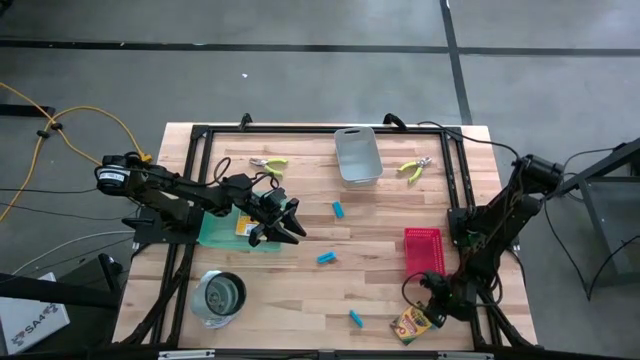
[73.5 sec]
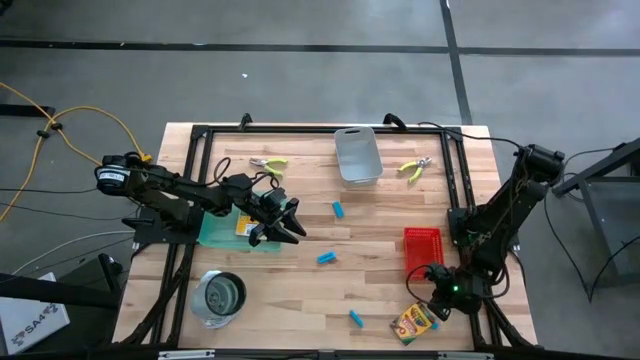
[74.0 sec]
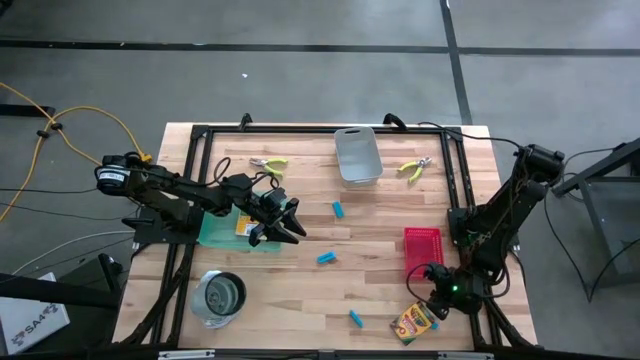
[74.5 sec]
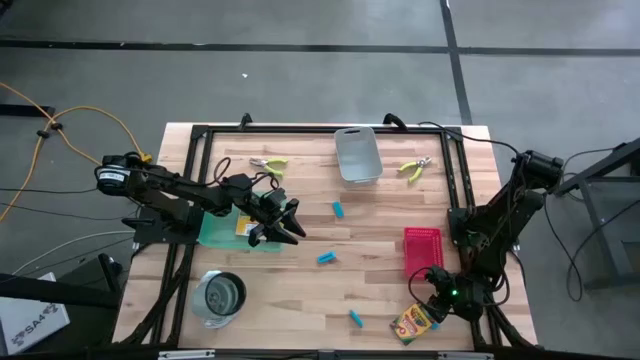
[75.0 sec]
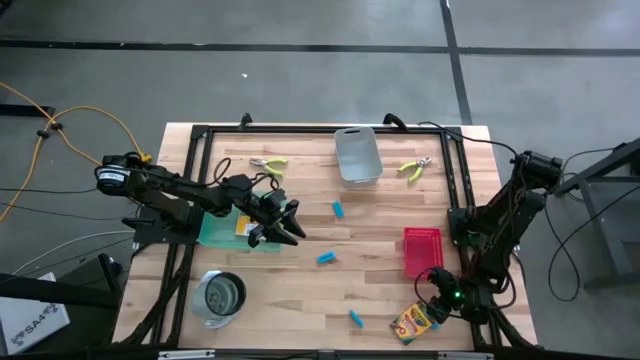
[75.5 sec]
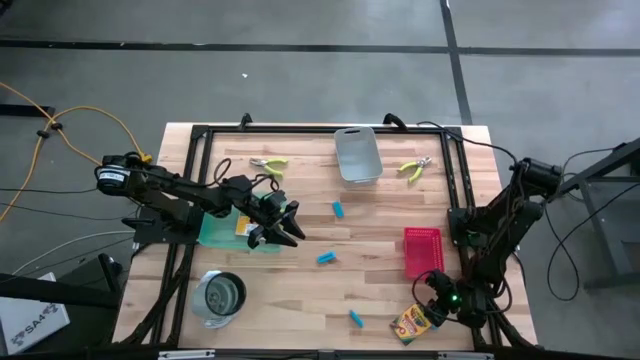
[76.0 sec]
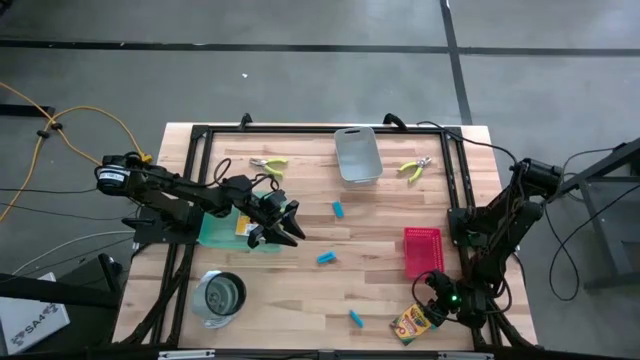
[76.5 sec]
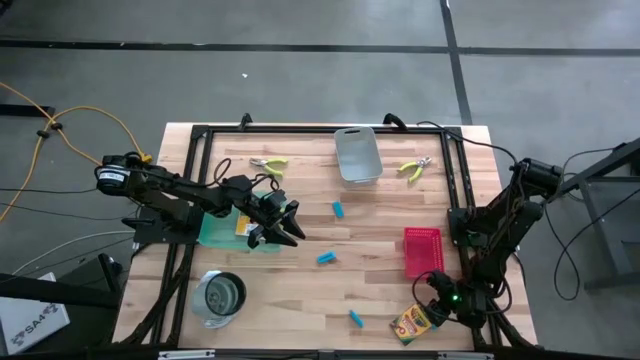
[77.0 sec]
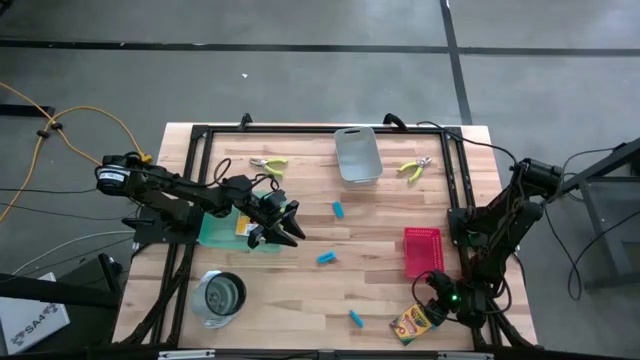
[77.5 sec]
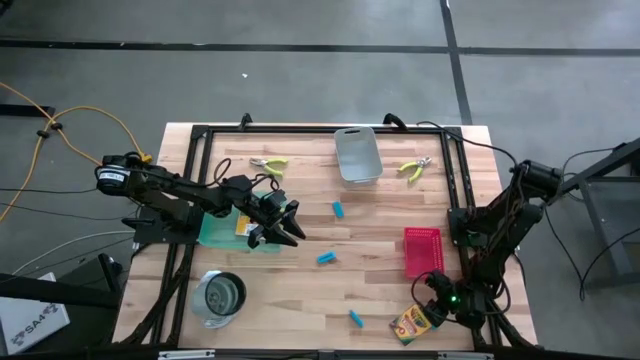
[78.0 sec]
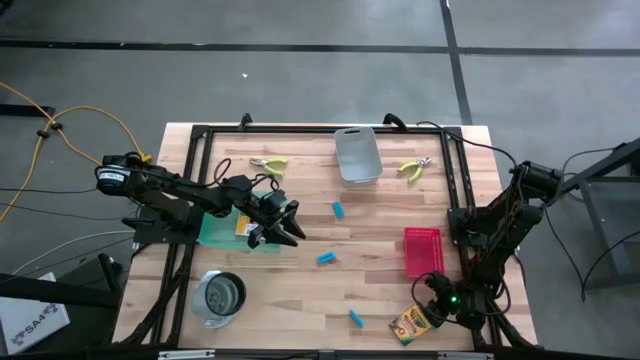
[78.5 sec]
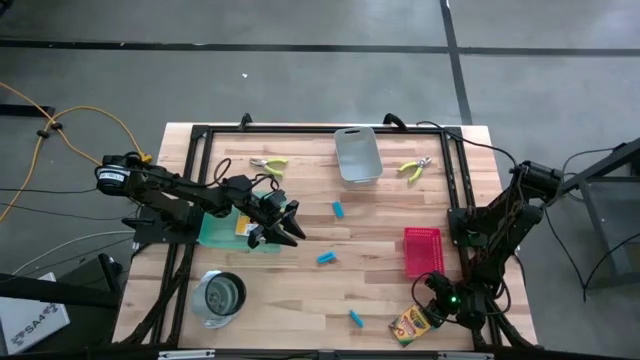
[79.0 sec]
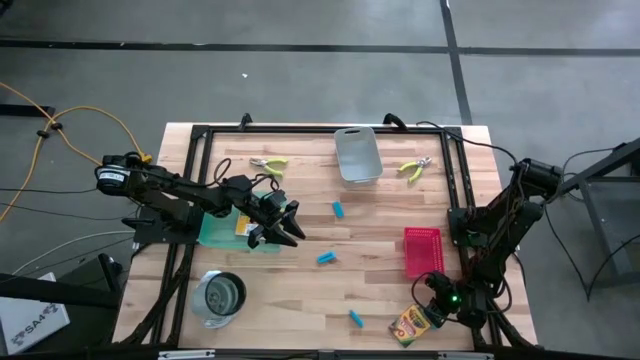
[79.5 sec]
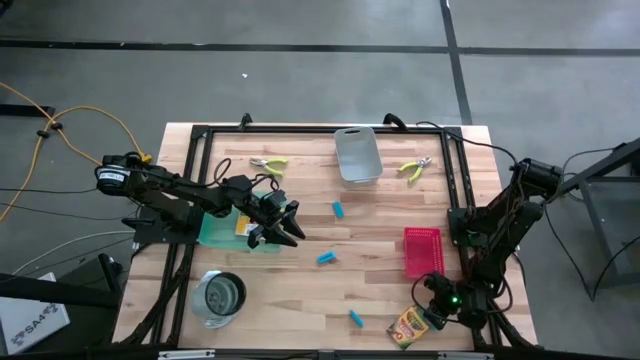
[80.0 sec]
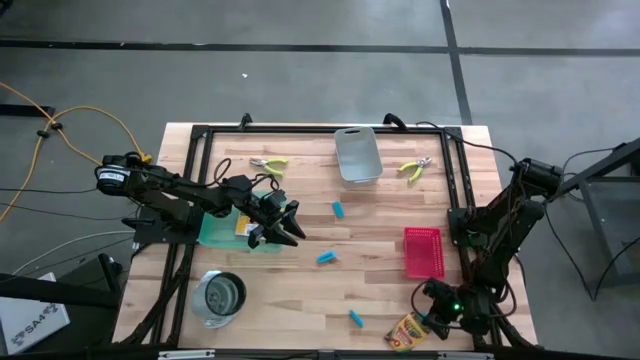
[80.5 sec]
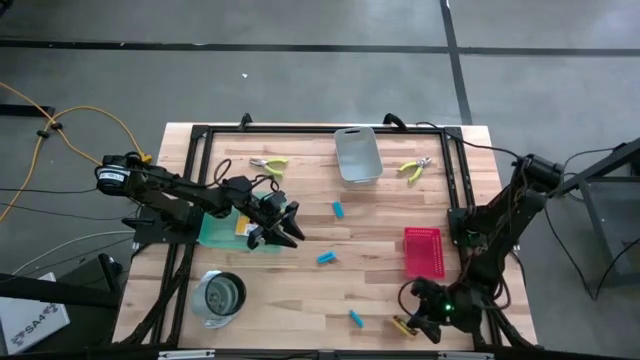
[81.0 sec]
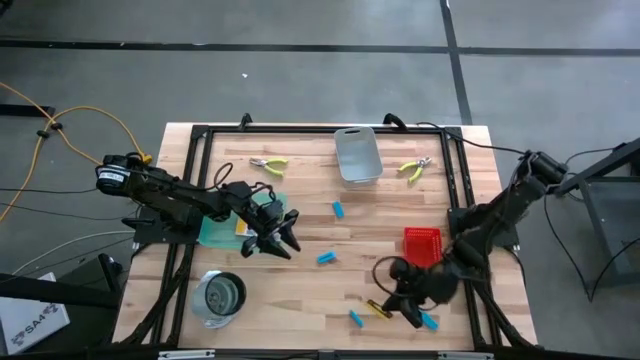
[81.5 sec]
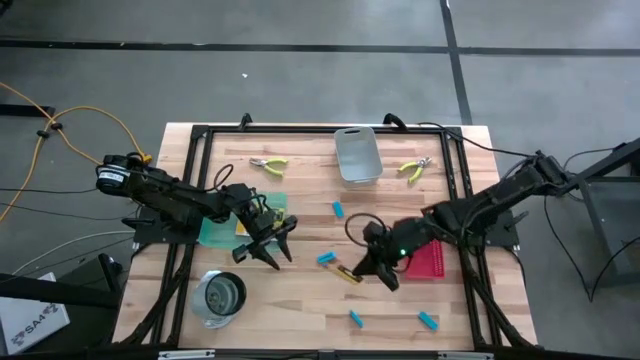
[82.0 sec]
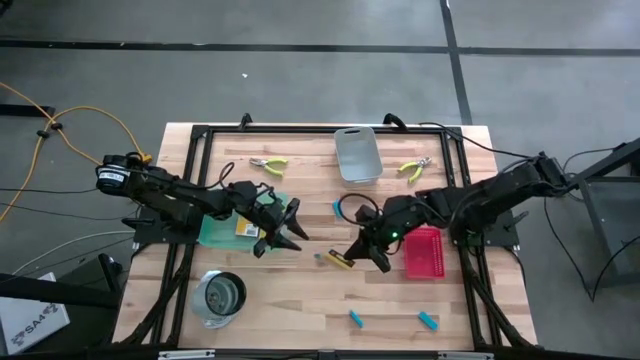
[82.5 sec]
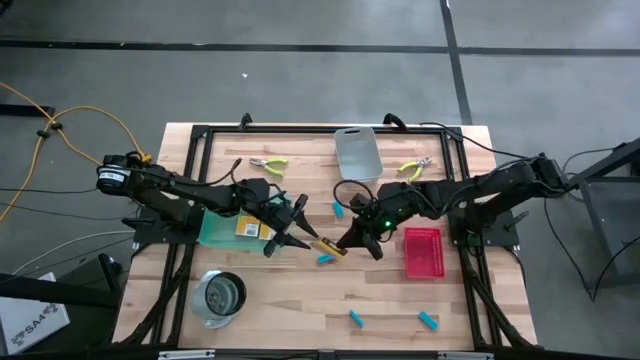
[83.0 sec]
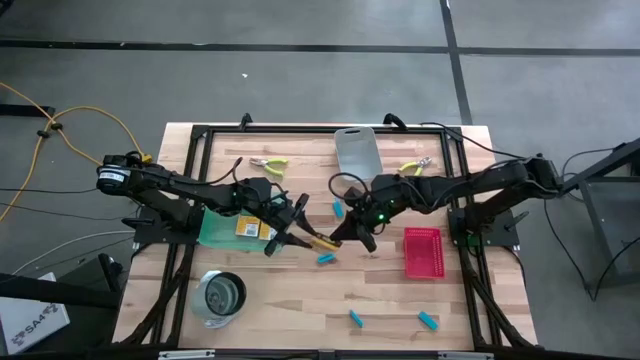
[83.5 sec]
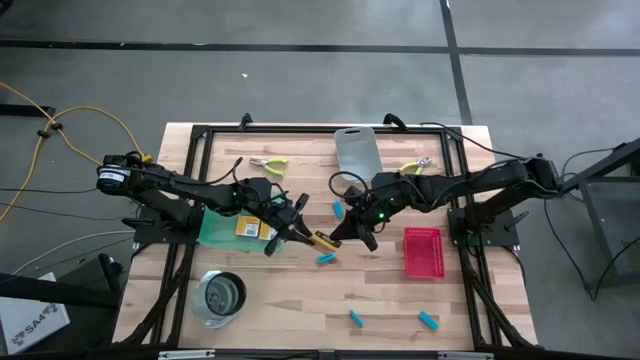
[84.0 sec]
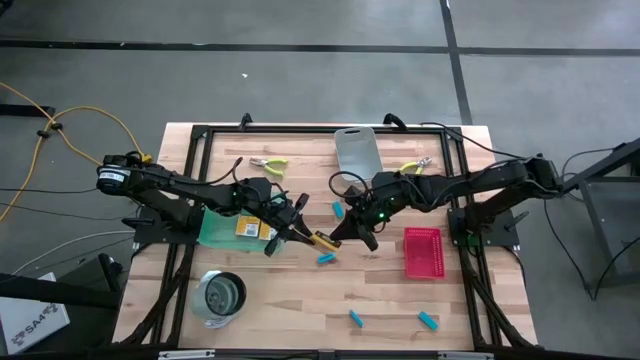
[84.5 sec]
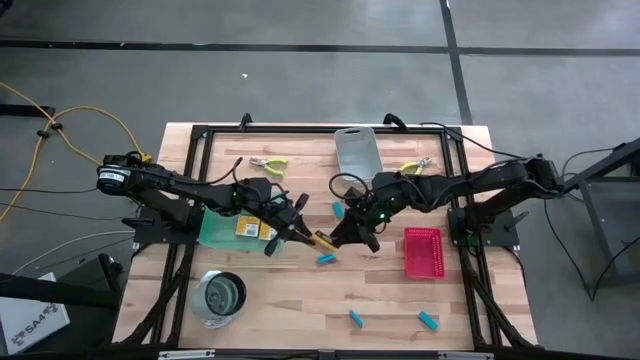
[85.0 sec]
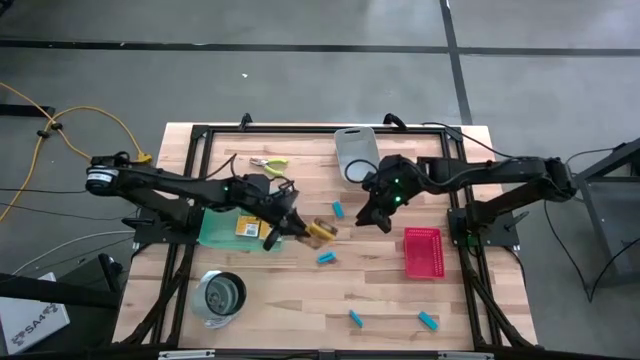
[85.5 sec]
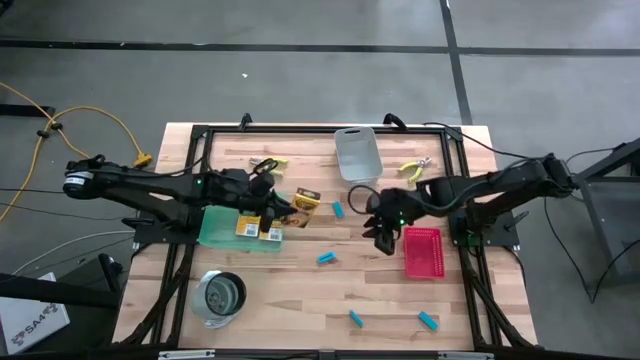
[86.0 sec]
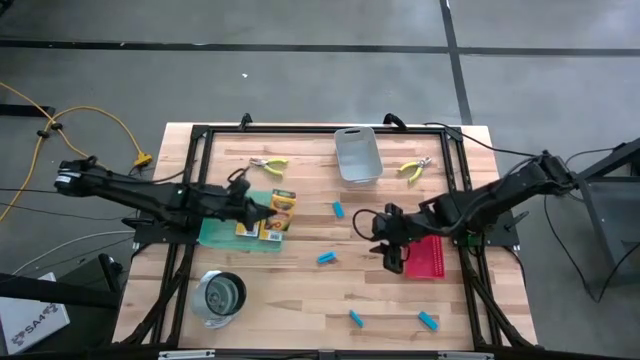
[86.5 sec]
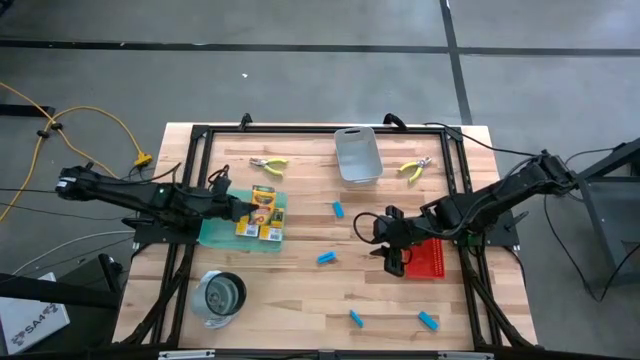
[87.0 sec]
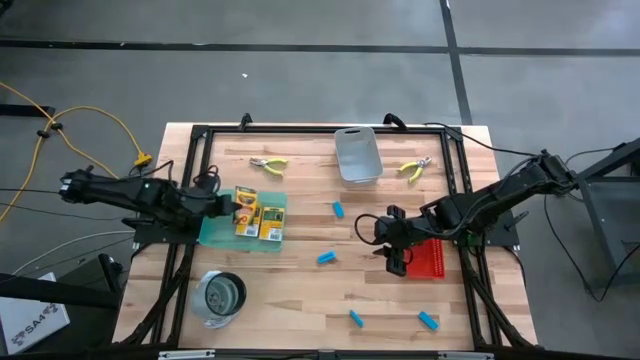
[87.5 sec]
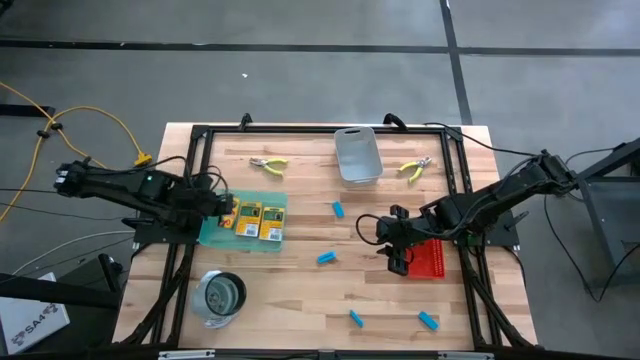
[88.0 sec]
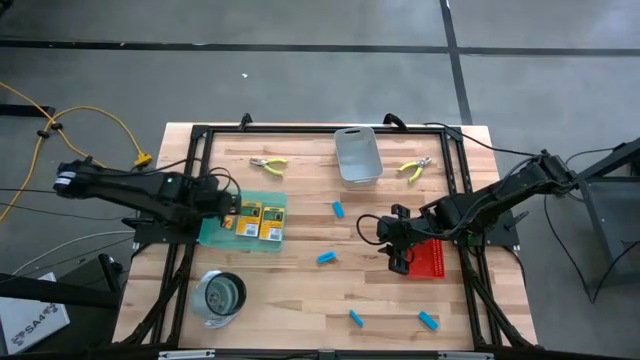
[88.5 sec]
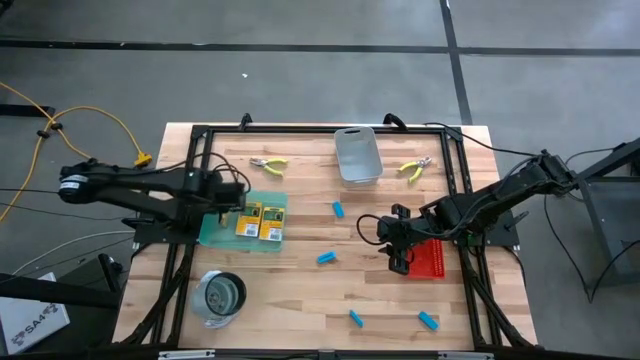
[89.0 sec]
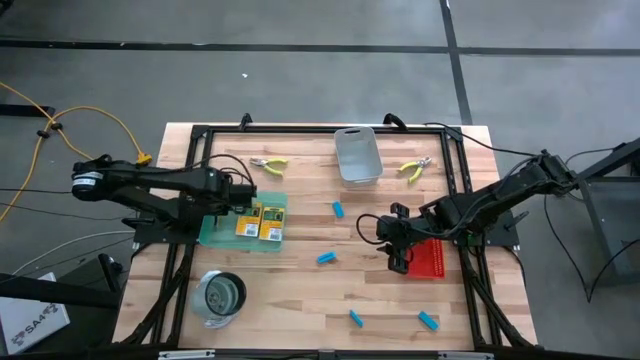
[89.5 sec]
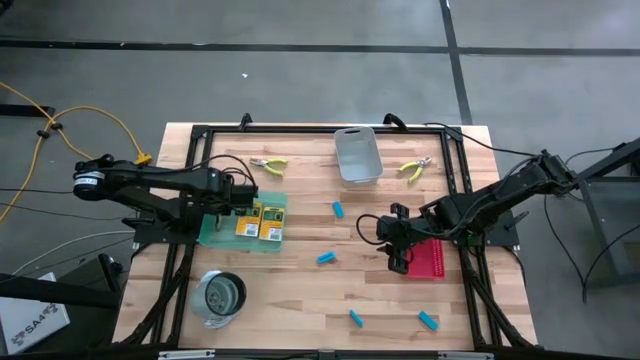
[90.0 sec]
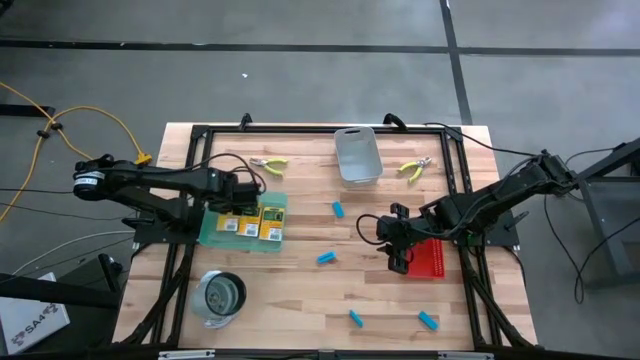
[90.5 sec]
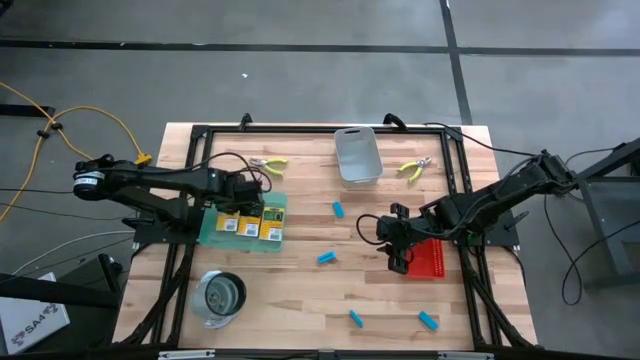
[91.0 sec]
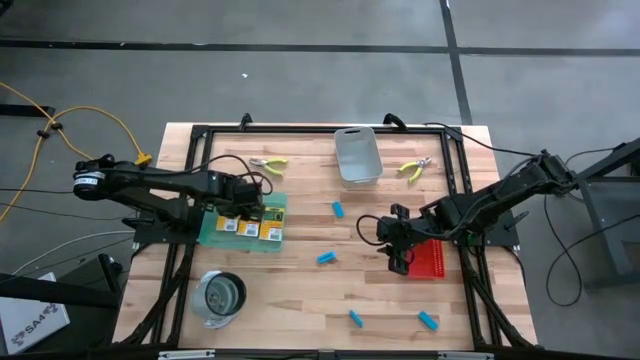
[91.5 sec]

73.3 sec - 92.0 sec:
Task: Pick & Place School Supplies
Put the crayon into the green bin

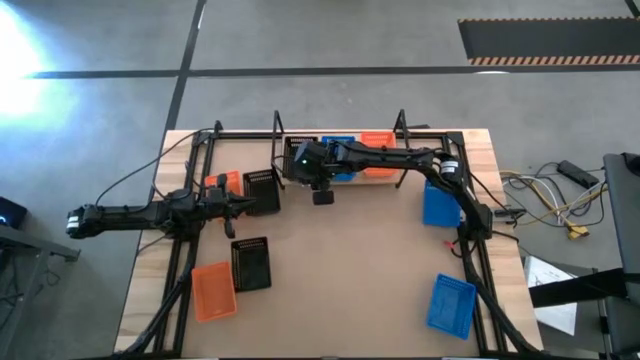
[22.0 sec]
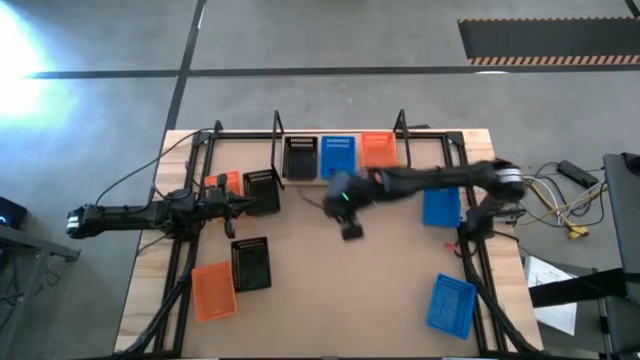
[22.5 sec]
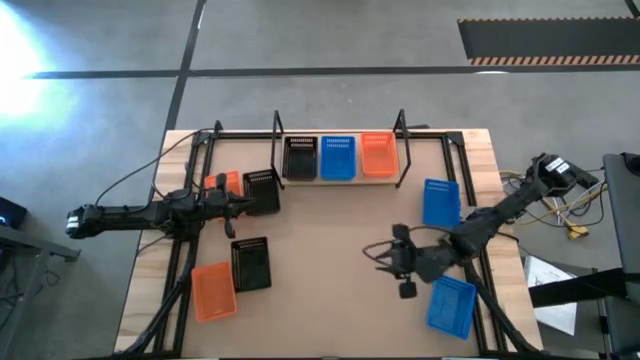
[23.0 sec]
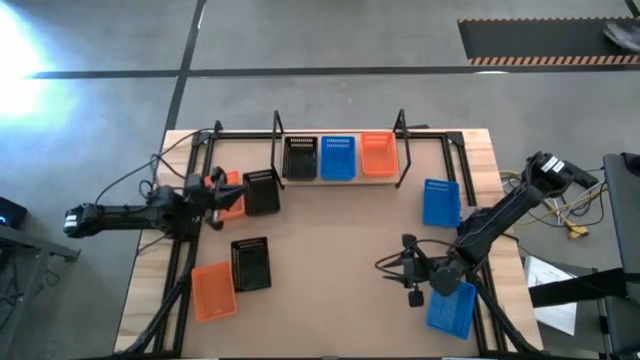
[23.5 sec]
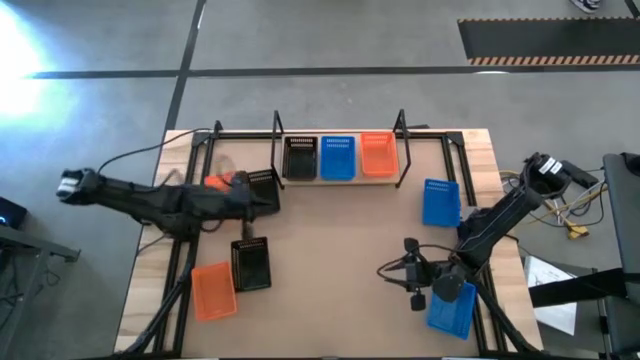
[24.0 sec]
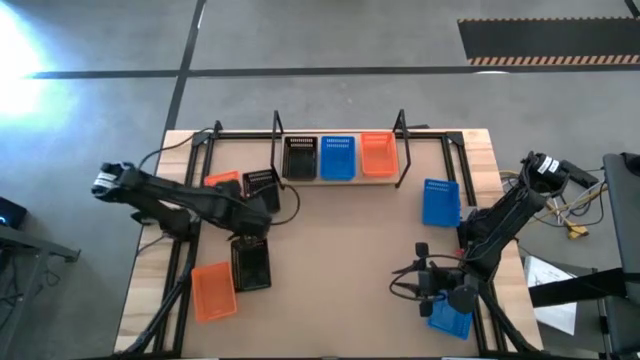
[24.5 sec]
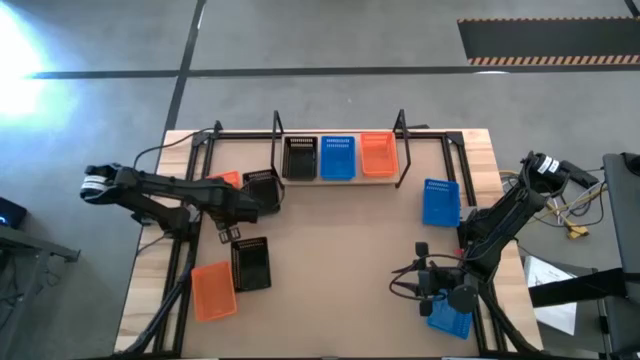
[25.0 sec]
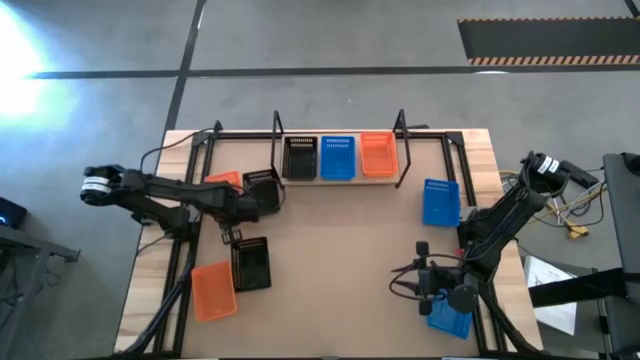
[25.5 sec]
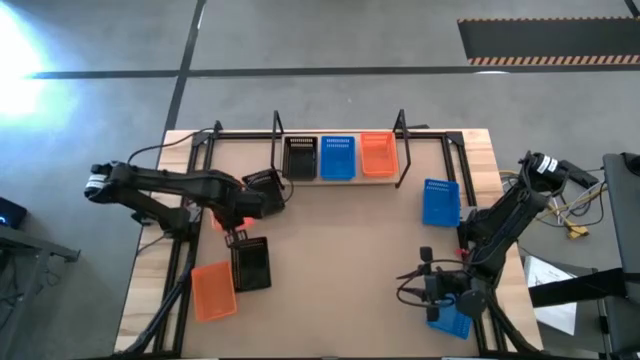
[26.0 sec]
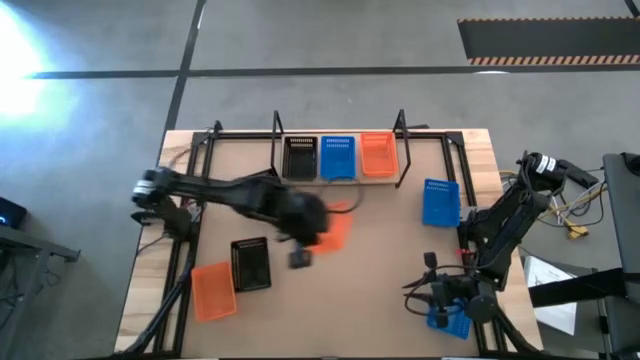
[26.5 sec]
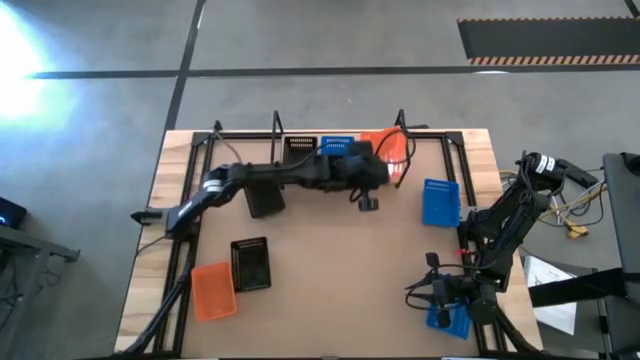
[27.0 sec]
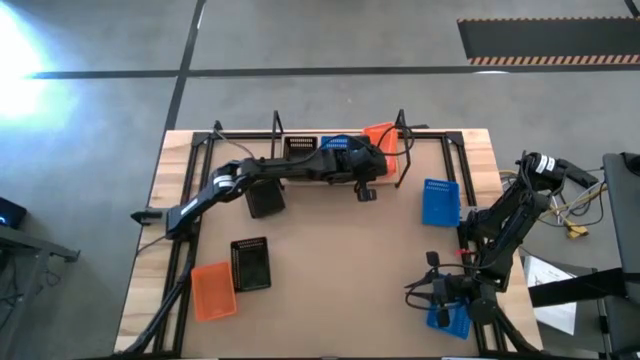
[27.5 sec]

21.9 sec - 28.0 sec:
Task: Stack baskets on shelf by color
Stack the top orange bin on the orange bin on the shelf
